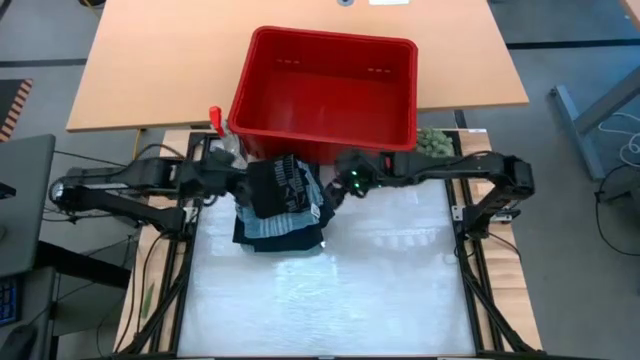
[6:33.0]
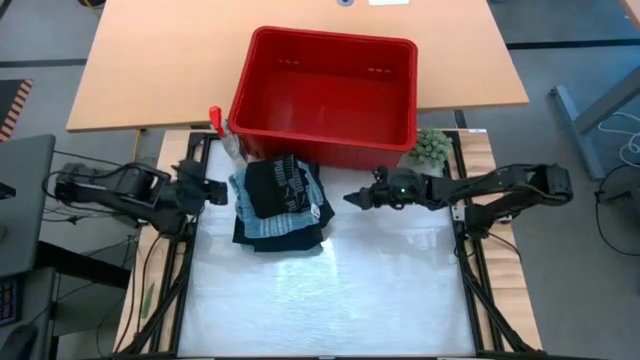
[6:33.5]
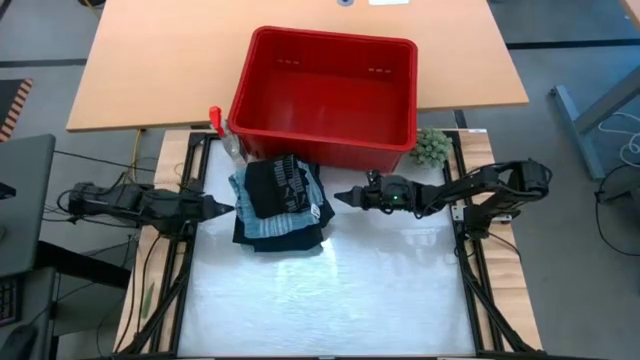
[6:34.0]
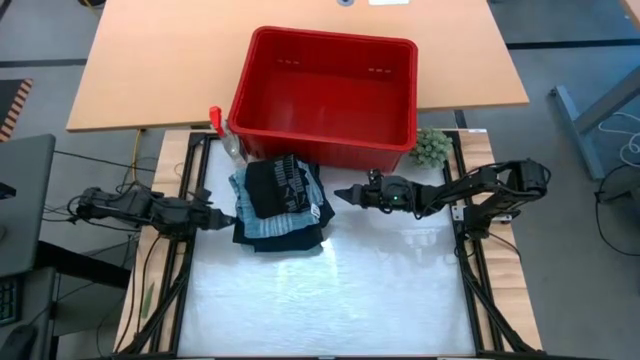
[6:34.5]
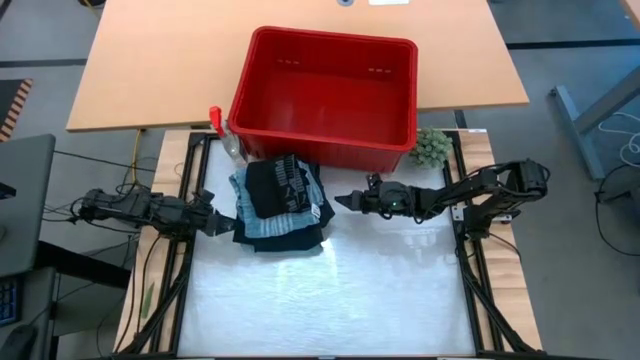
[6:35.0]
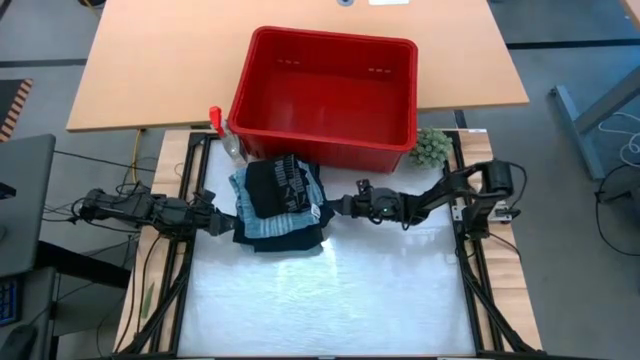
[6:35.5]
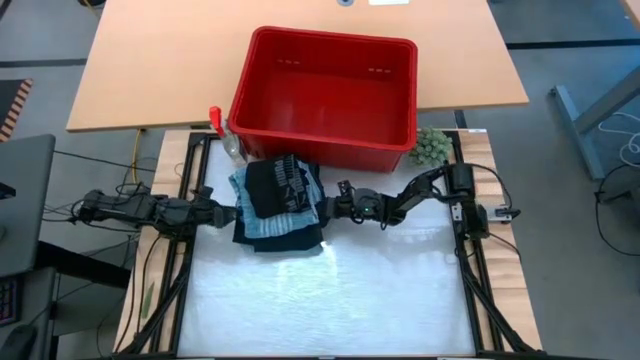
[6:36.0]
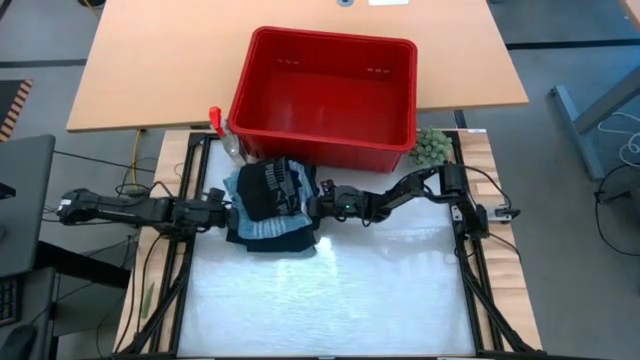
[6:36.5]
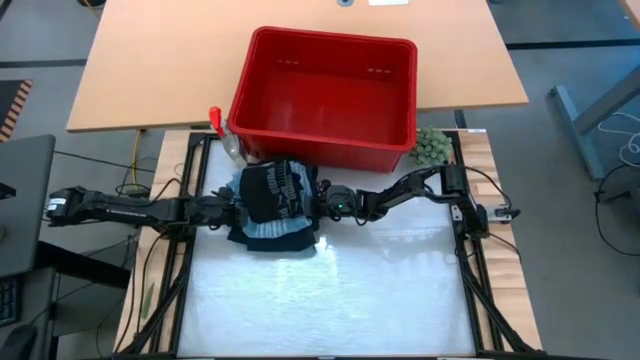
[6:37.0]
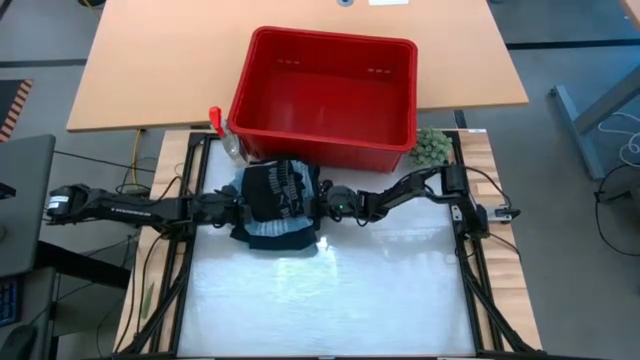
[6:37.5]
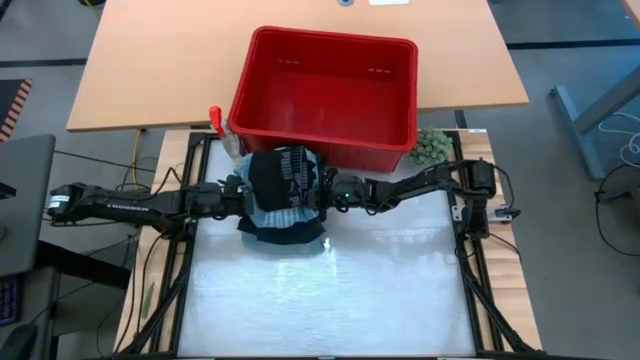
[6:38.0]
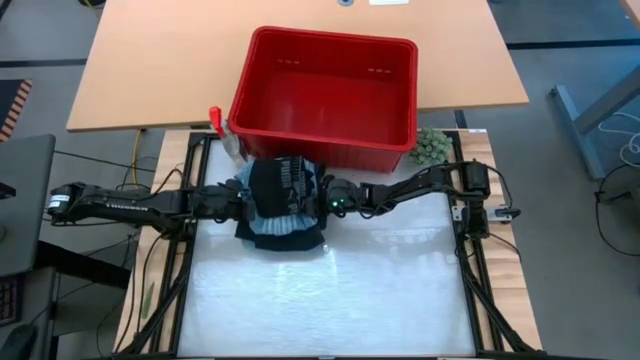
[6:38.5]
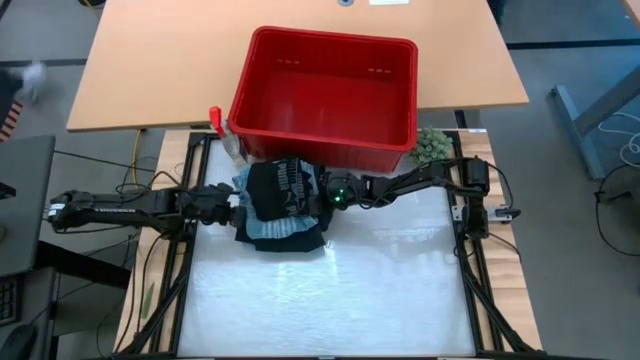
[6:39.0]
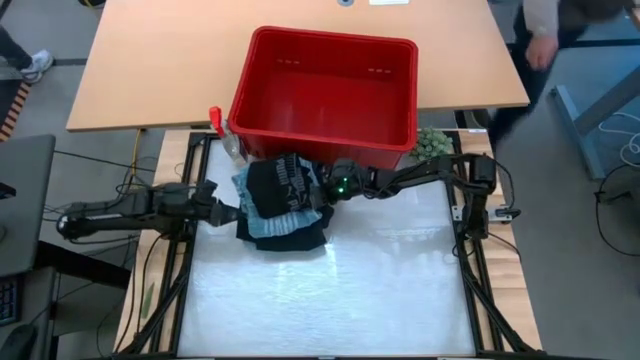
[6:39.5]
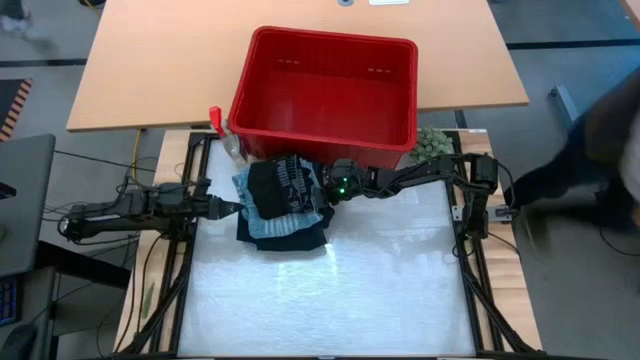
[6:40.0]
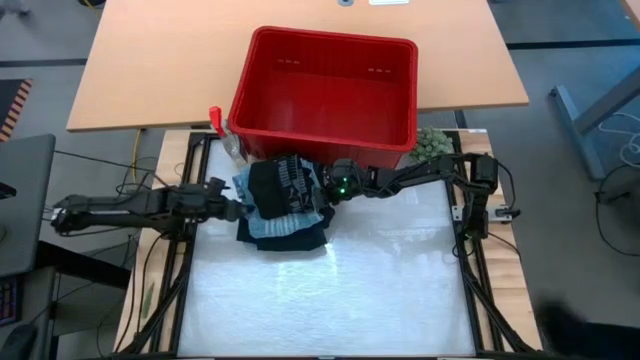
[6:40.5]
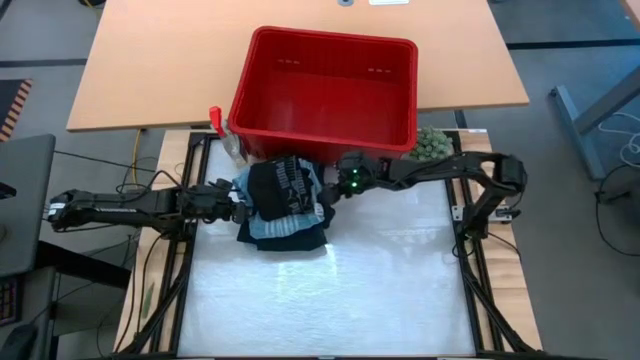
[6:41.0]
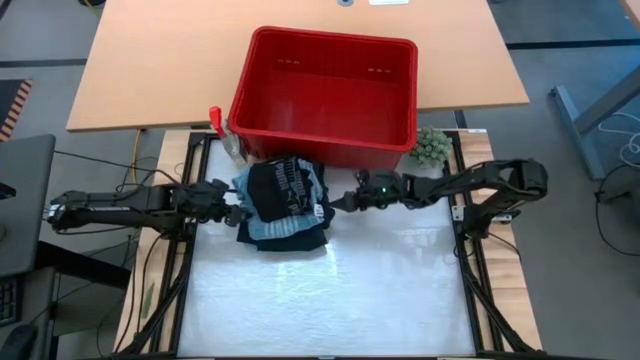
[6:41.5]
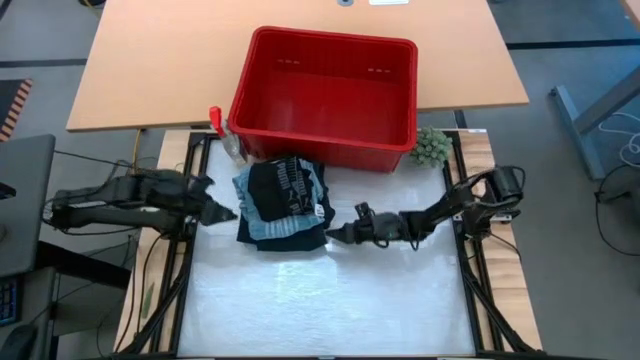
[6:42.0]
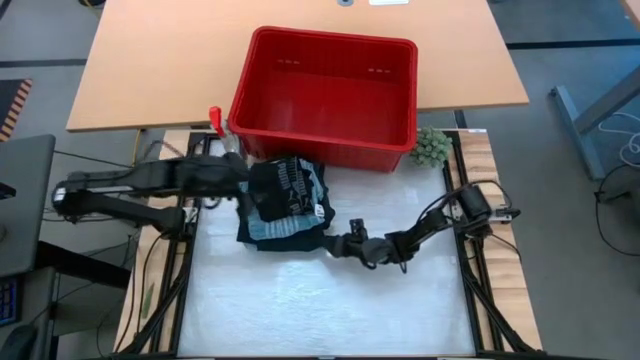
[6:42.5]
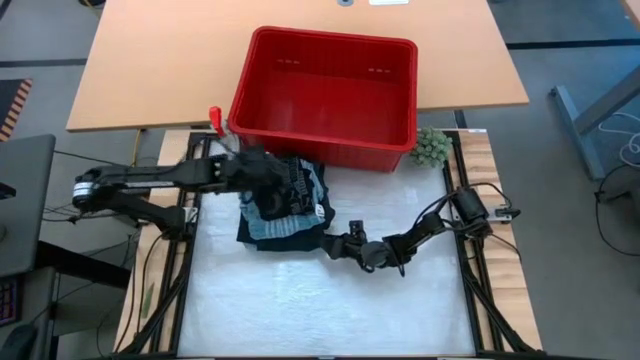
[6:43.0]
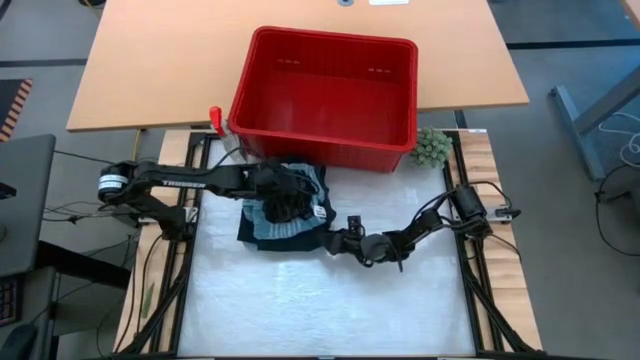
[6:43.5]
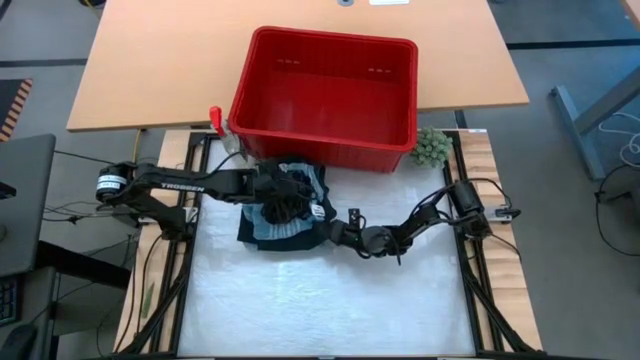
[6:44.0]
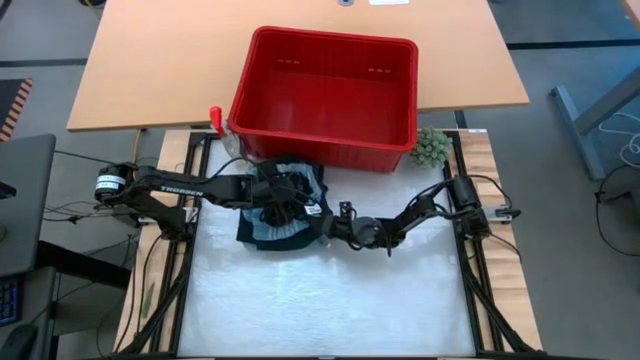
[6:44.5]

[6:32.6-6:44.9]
Task: Fold laundry
Put the folded blue and black pants, blue shirt, and black boxer into the red laundry bin

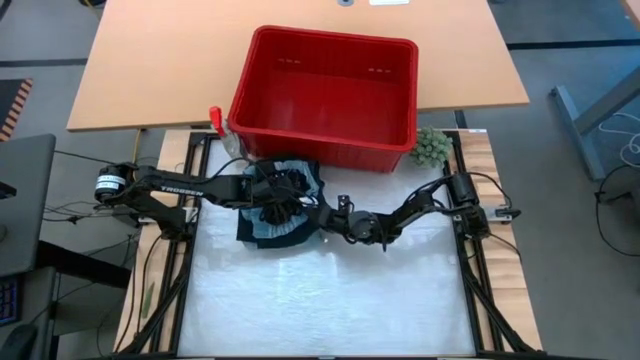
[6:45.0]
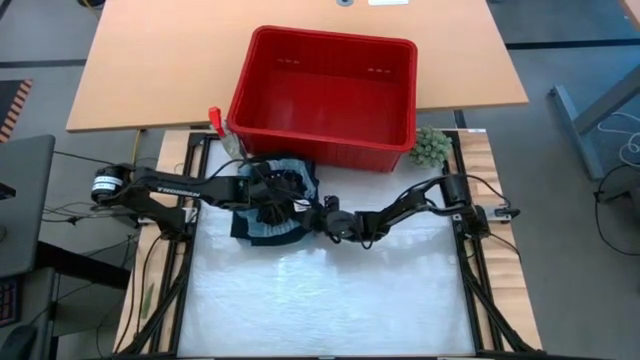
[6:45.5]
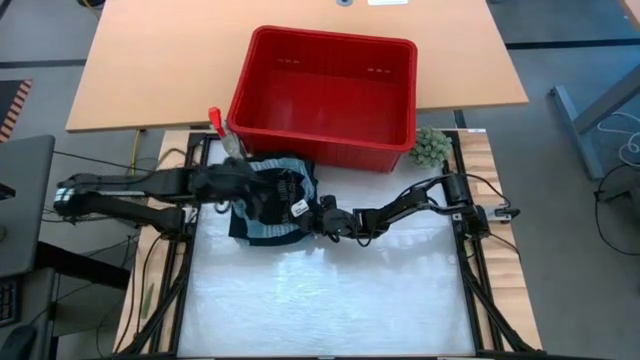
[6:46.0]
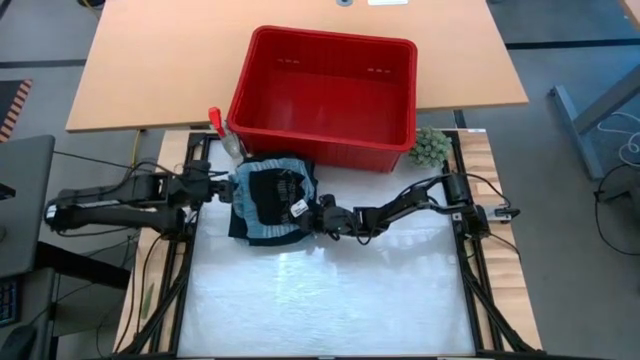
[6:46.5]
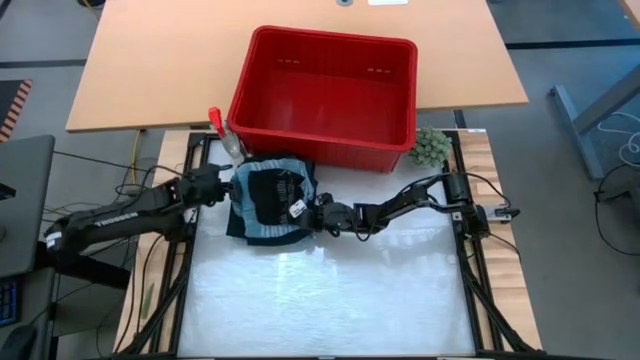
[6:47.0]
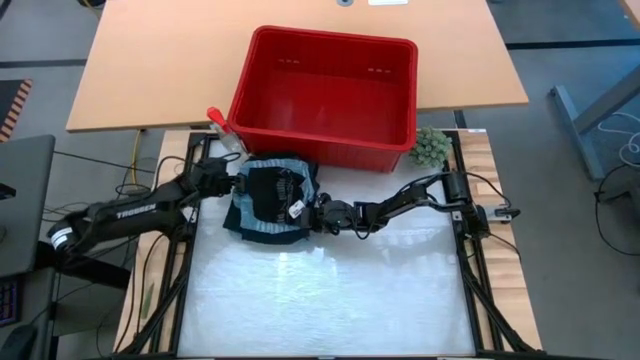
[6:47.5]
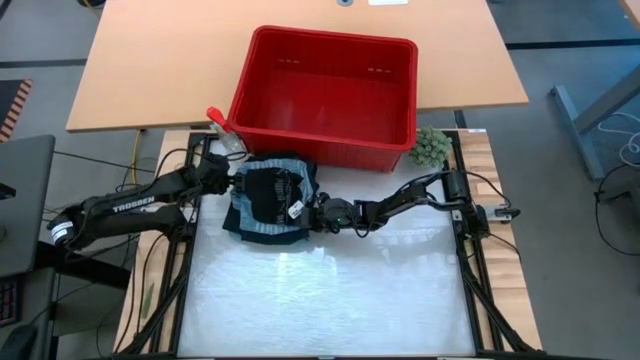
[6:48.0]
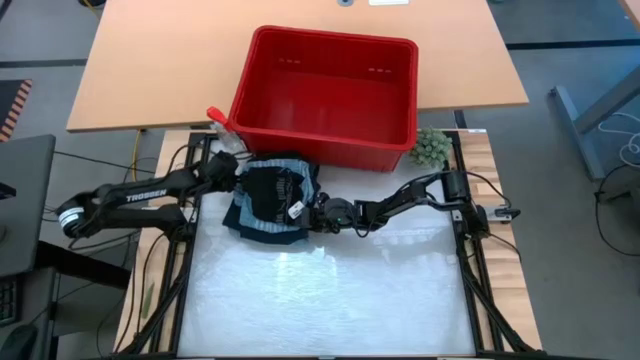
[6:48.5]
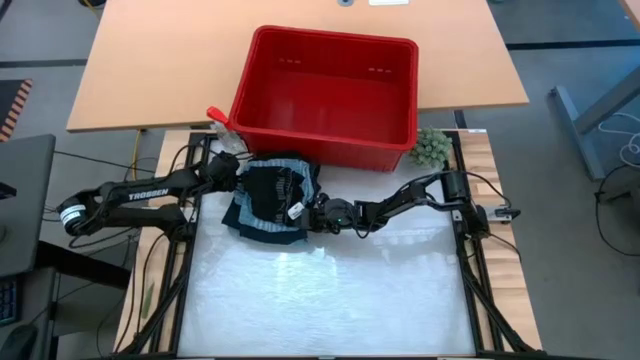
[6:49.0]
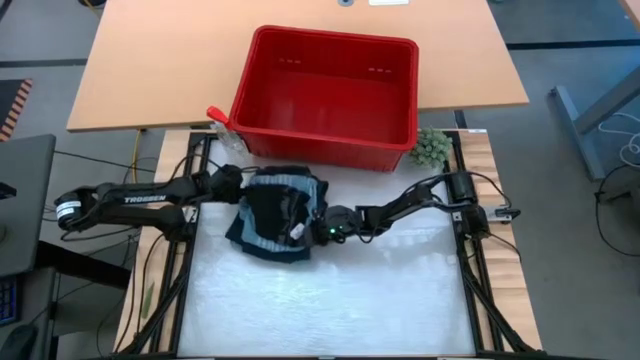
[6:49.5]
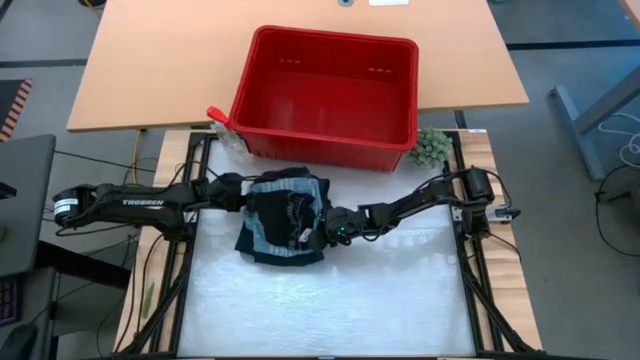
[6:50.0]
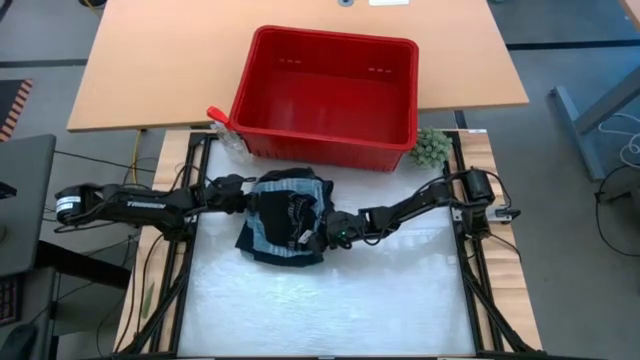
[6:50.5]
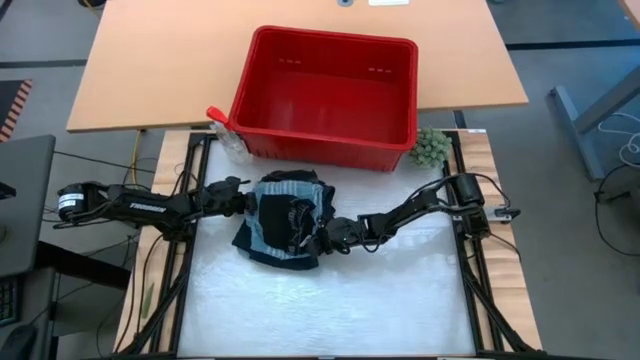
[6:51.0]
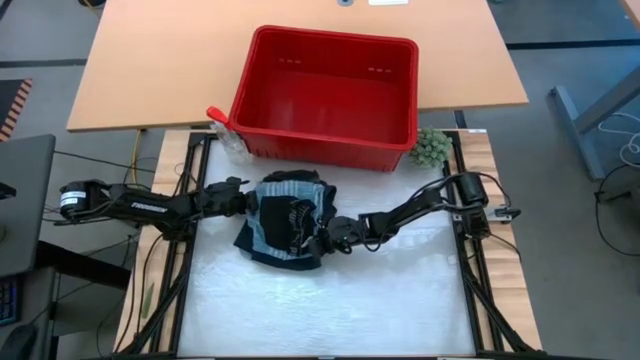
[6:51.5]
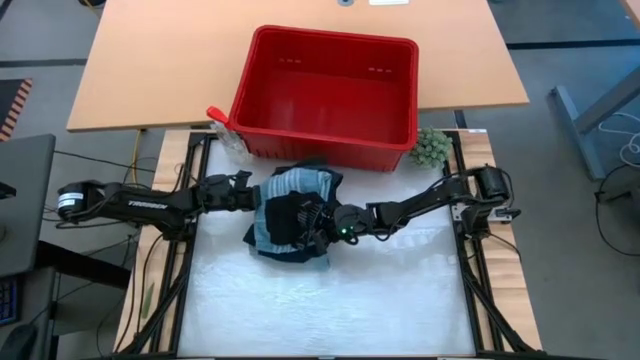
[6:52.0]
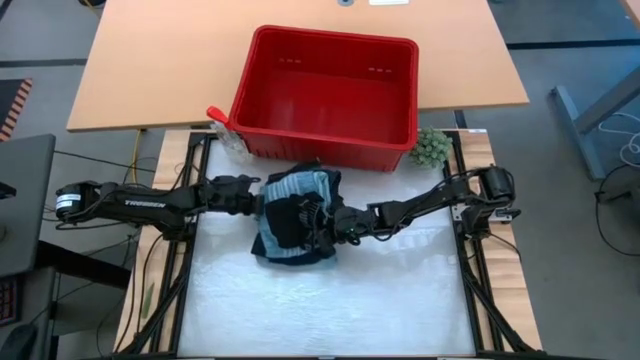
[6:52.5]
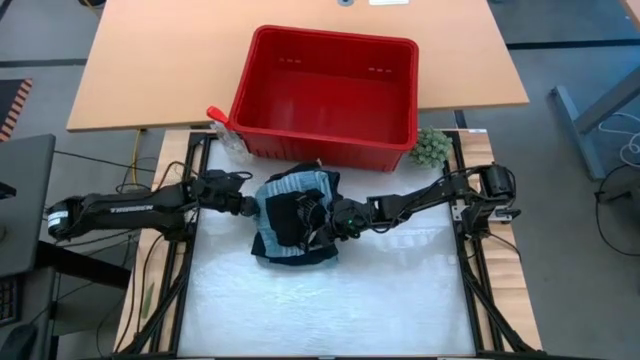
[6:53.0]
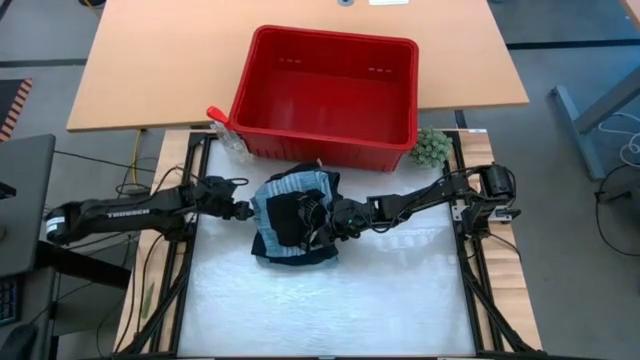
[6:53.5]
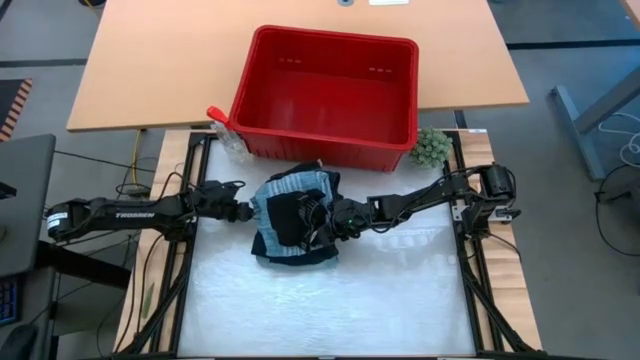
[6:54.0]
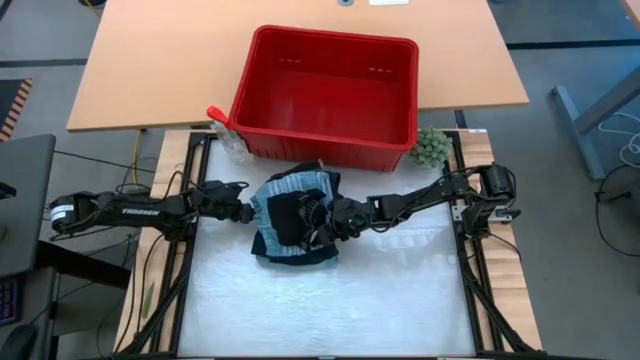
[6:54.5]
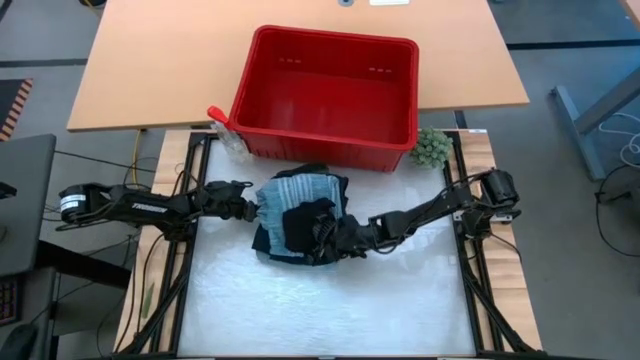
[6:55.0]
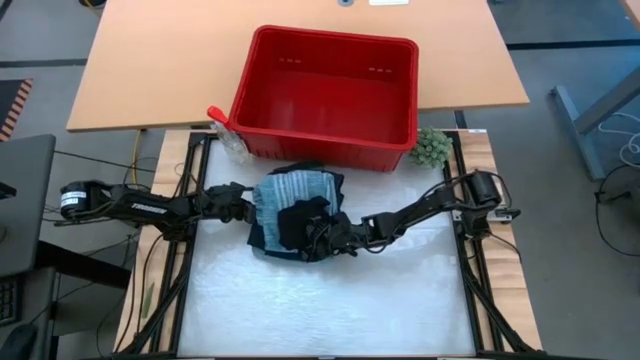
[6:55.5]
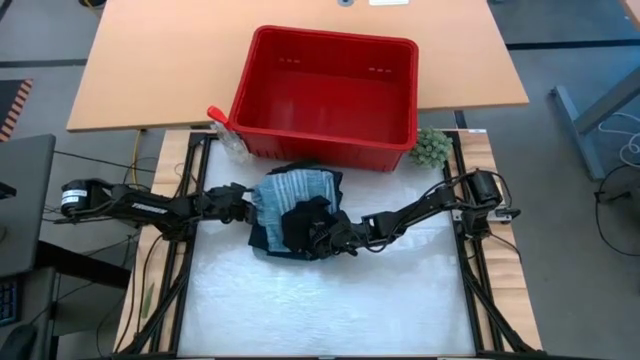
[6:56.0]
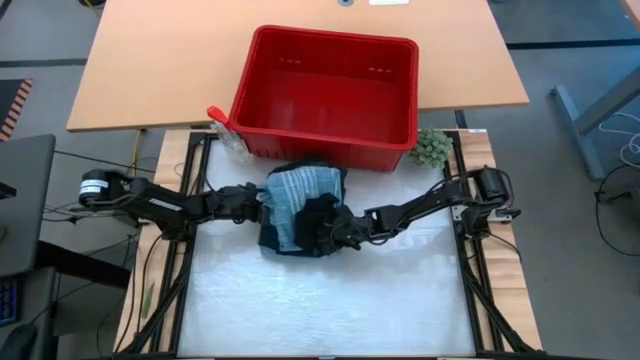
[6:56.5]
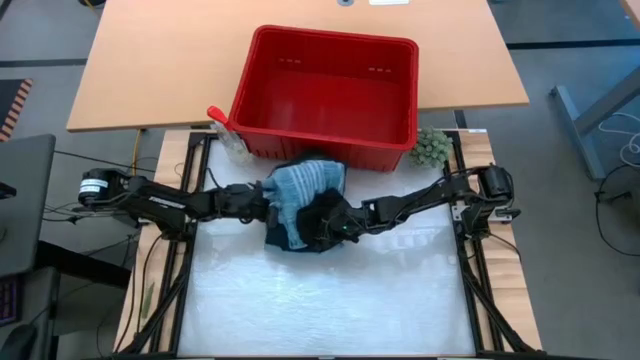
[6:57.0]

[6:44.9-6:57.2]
Put the folded blue and black pants, blue shirt, and black boxer into the red laundry bin
